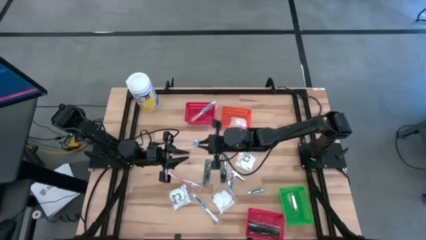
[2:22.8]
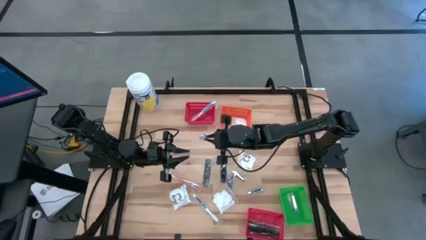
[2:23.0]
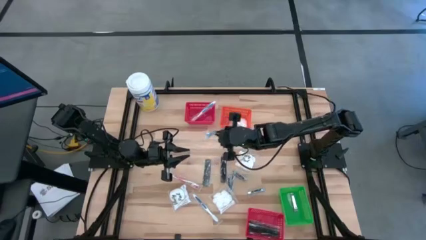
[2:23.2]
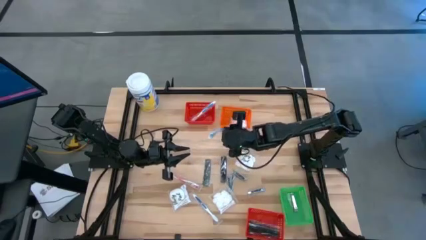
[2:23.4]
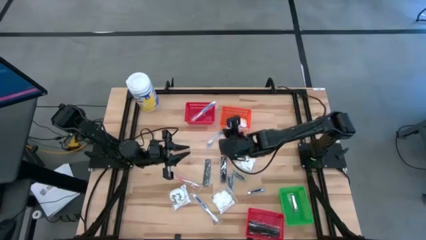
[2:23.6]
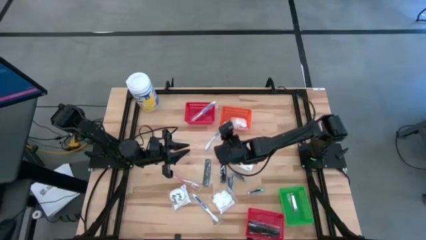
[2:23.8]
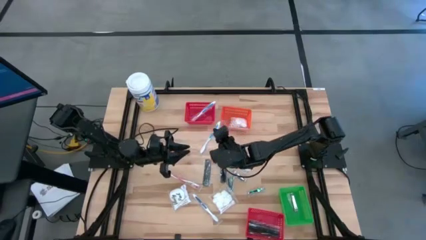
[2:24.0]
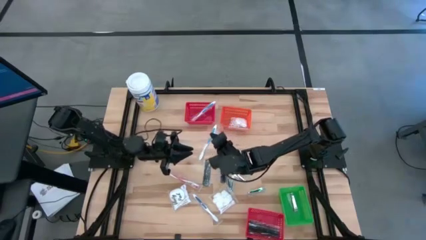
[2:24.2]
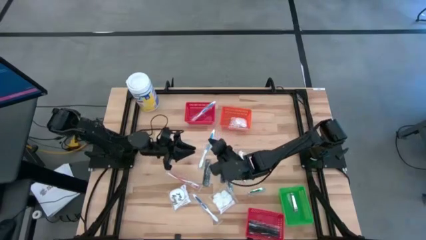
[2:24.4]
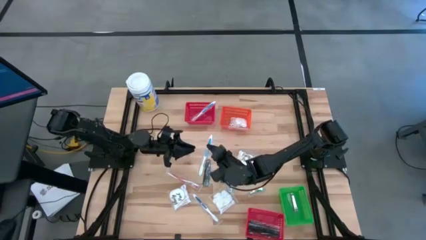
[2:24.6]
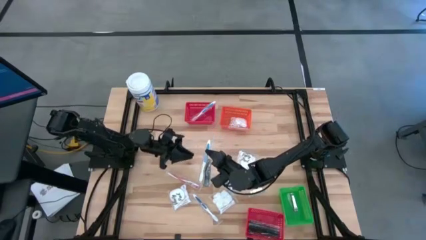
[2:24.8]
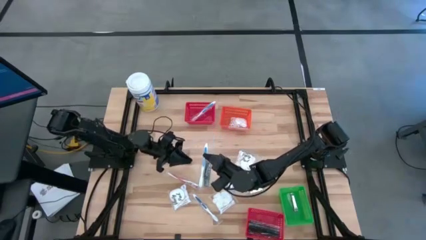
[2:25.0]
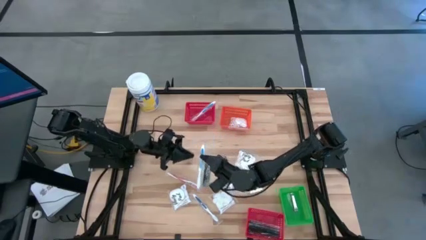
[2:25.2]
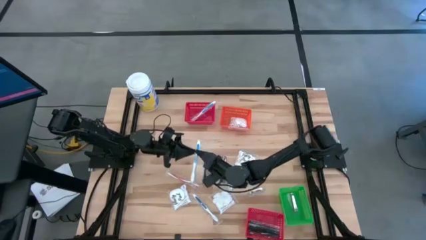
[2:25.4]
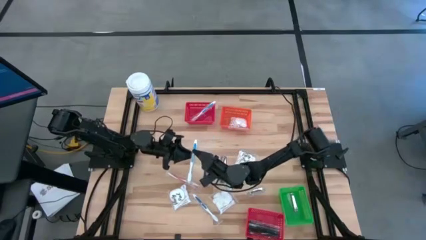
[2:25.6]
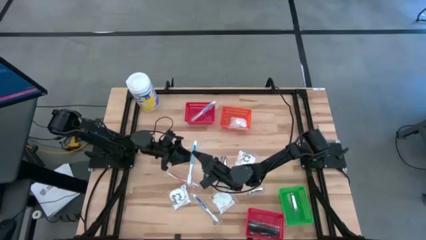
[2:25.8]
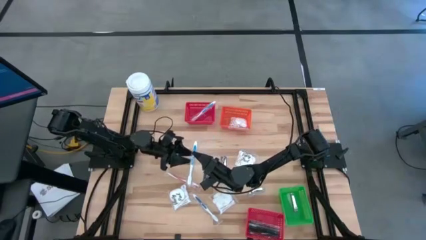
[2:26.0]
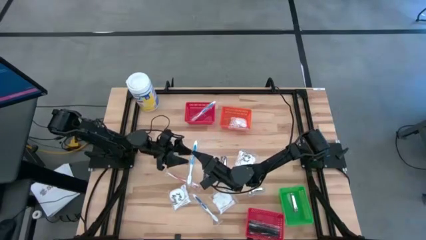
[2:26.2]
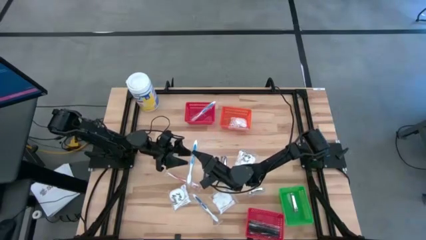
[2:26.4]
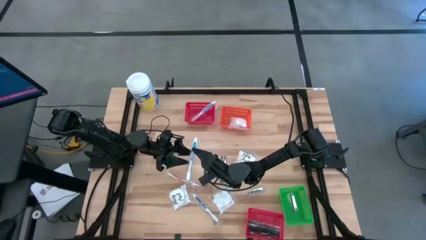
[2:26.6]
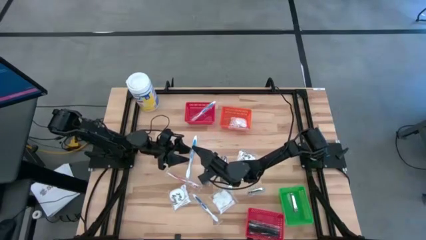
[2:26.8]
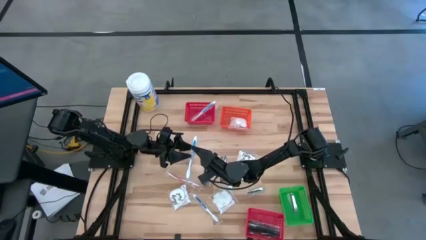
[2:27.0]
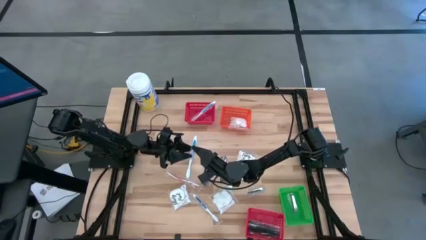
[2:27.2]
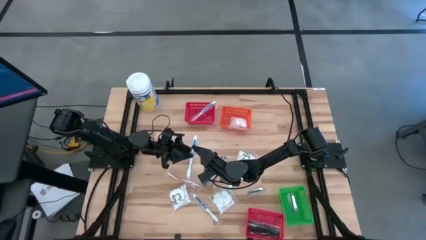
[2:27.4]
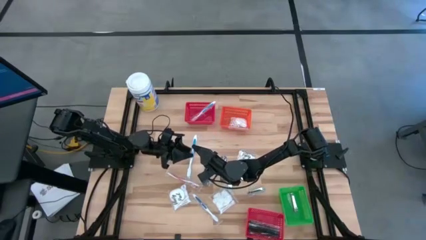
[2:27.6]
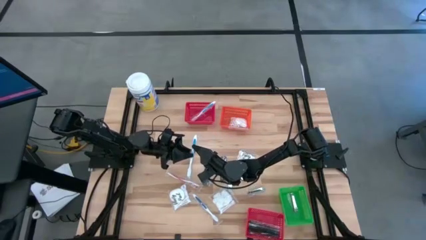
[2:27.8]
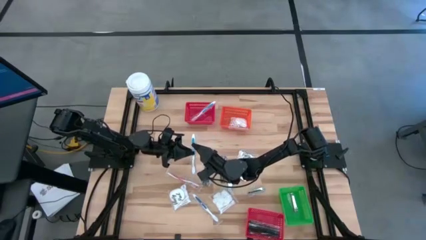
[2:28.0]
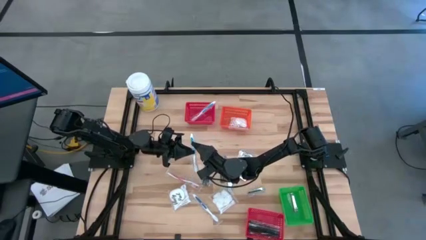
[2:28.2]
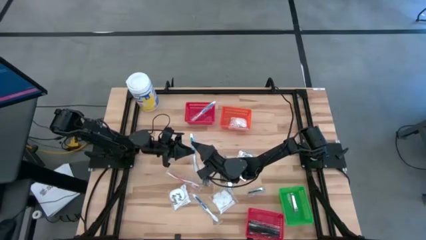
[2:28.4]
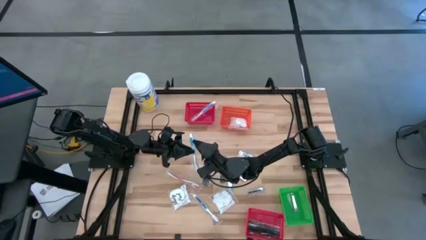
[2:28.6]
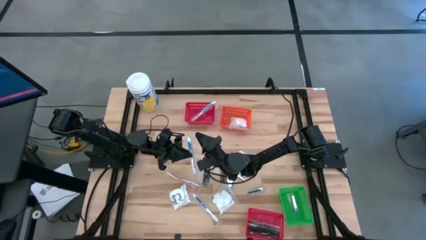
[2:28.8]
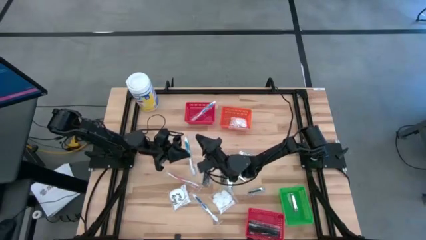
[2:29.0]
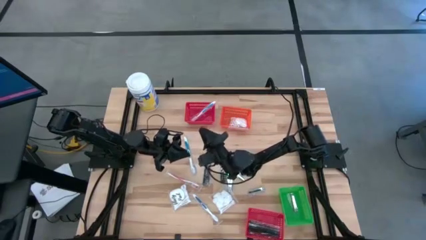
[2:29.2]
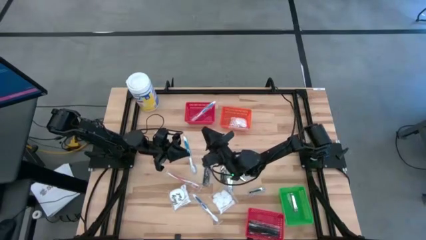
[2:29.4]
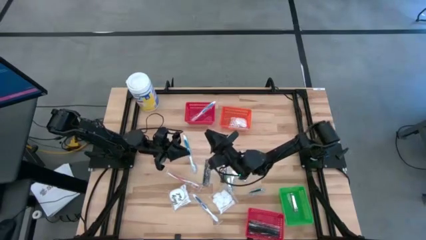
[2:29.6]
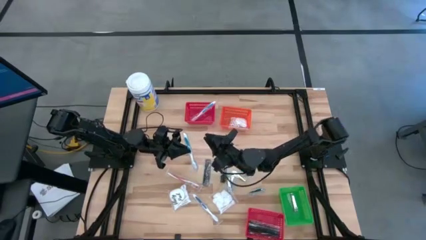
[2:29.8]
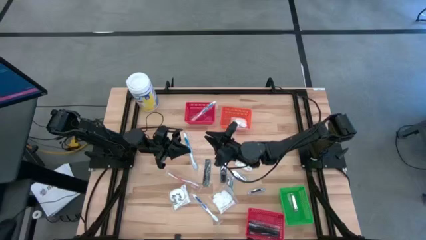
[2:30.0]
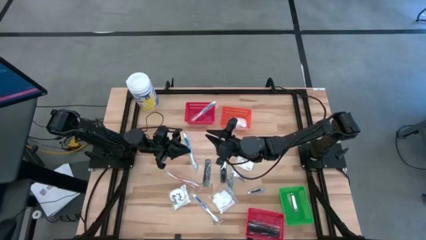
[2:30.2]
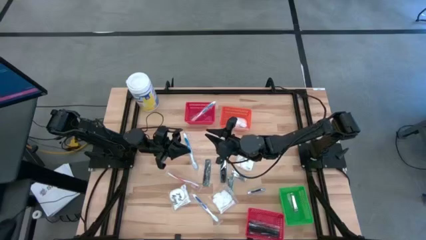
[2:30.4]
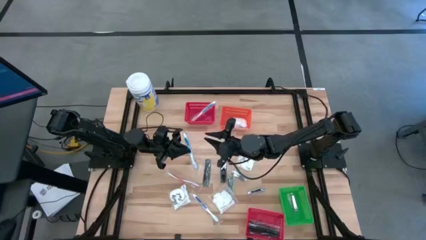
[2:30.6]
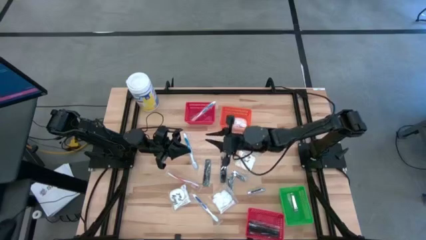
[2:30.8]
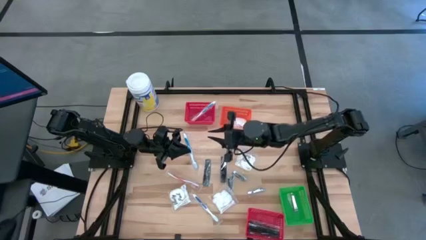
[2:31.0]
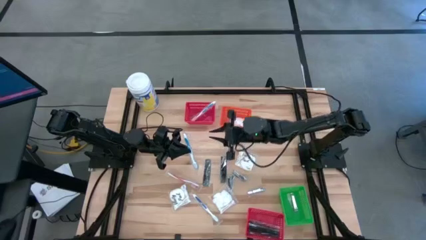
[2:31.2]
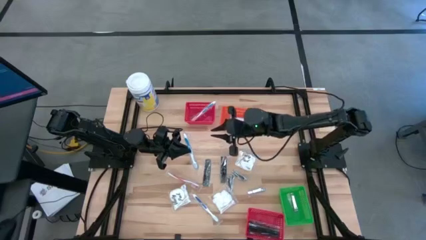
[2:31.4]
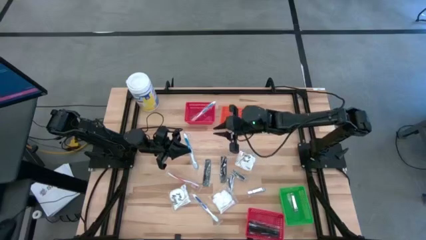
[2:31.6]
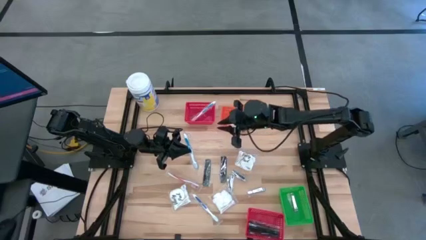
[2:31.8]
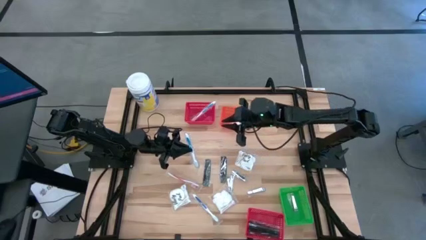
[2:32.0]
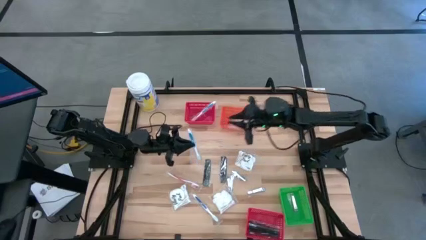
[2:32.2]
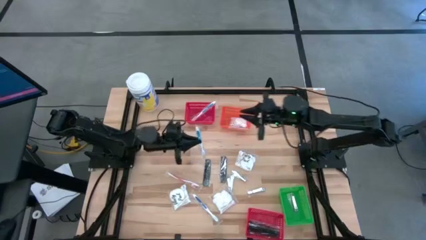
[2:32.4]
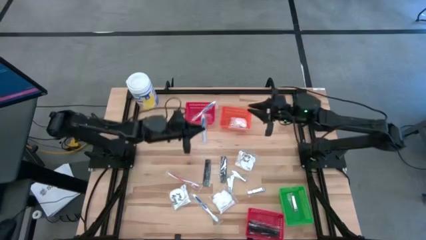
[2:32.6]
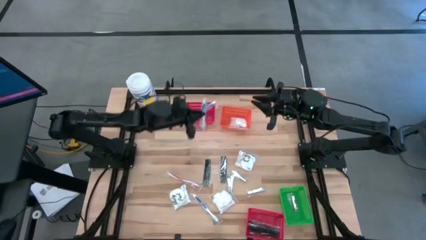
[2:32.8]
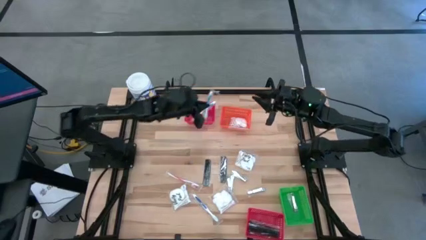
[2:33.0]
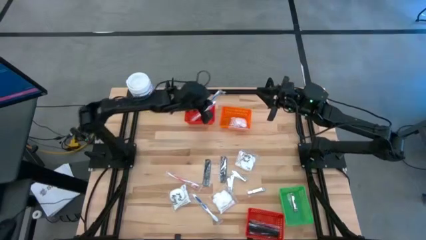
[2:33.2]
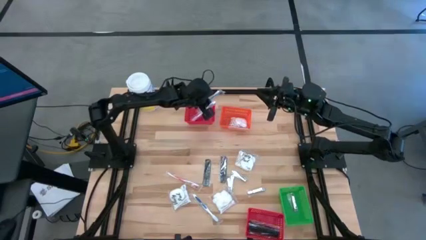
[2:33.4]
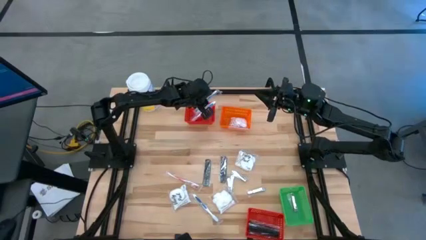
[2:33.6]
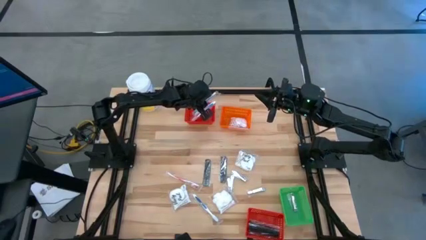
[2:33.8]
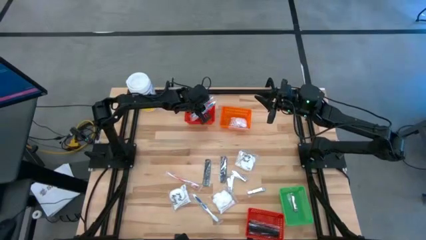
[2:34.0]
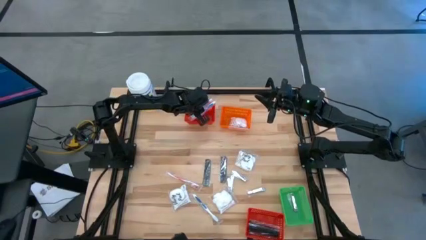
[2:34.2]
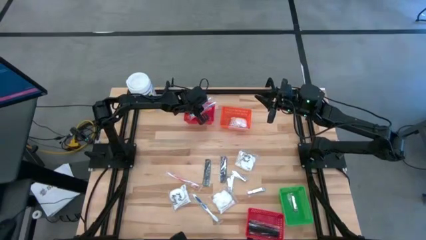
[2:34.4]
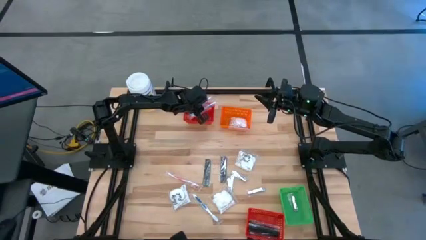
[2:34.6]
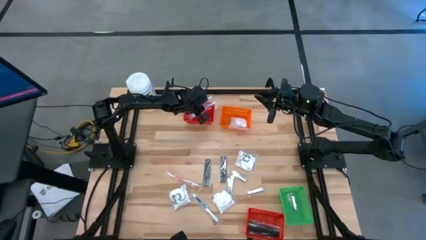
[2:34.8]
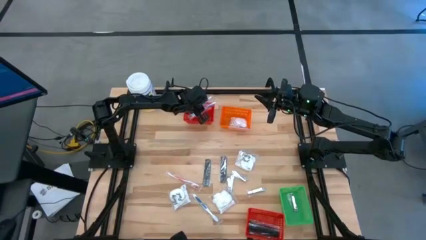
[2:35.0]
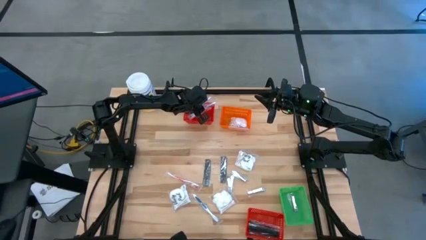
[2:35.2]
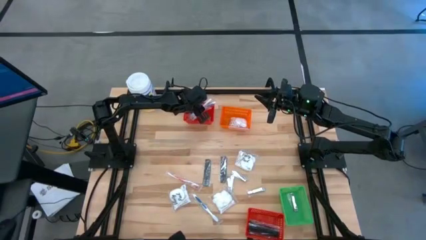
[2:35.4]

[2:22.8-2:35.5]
Task: Pick & Place Travel size toiletries
Put the blue toothbrush into the top red bin

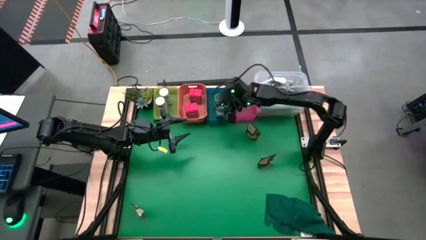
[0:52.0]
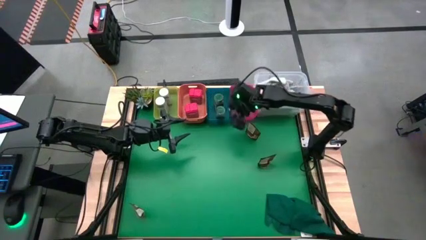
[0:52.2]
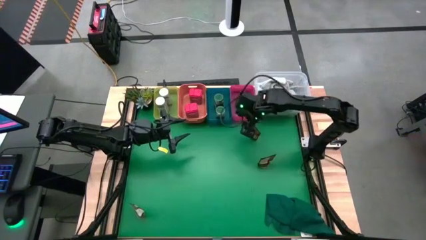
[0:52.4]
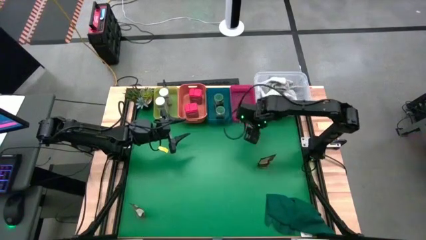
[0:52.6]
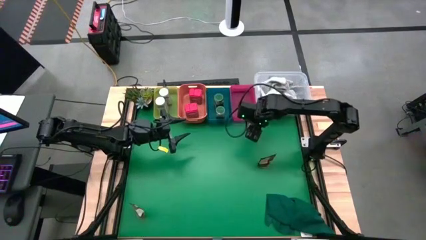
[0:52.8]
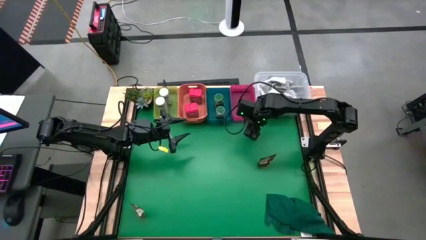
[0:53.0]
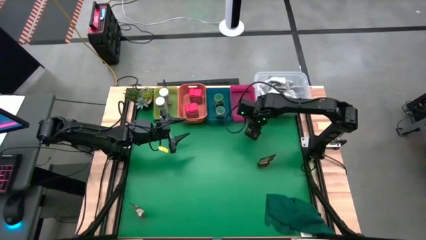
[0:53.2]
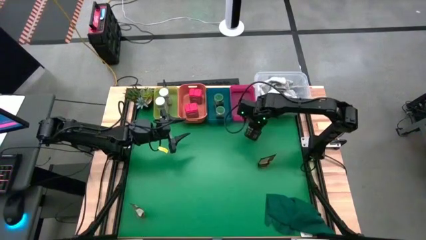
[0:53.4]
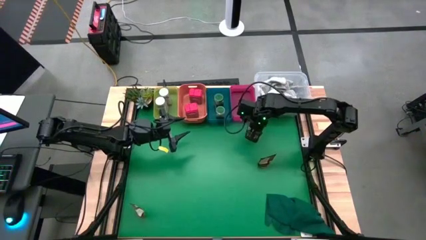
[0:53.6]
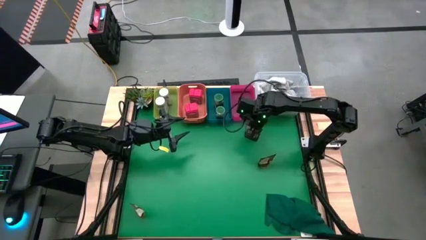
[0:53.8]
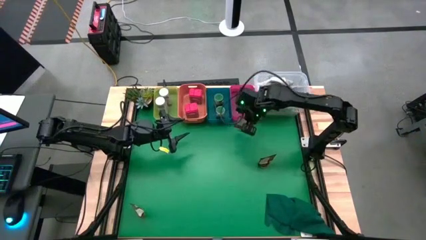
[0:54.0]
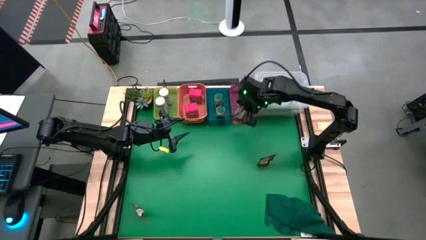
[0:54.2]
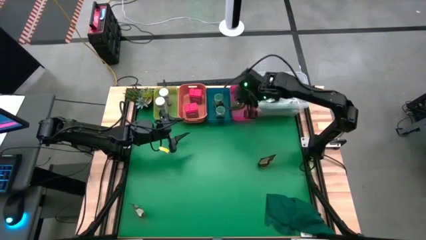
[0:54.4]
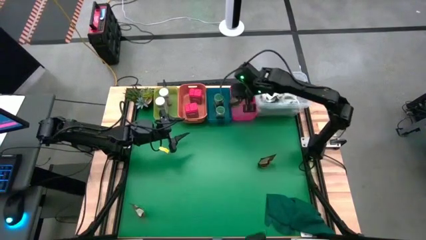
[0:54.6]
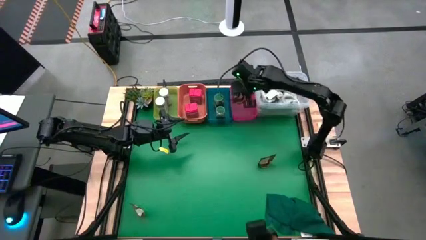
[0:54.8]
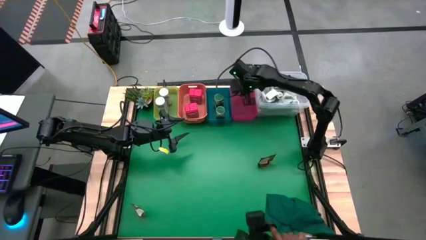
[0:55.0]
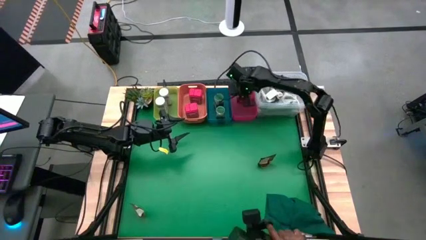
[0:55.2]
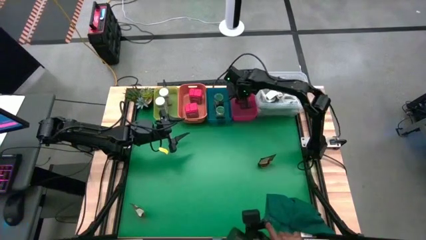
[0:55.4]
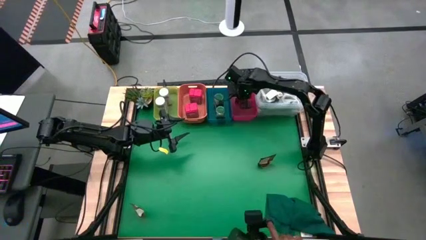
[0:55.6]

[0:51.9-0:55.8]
Task: Sort spices by type
Put the top right brown seasoning bag into the red bin
